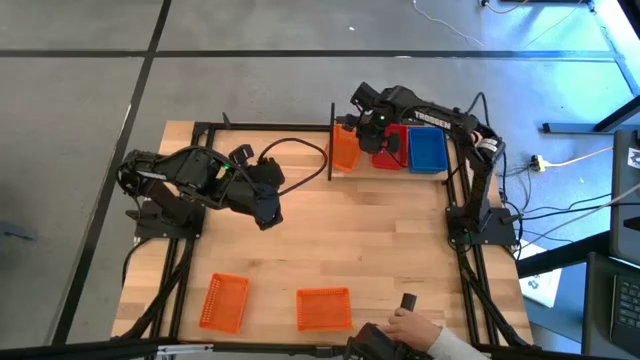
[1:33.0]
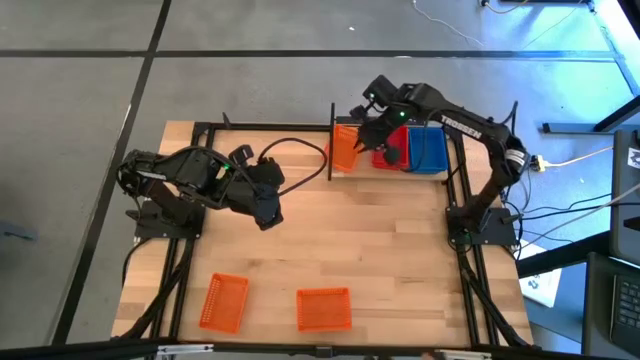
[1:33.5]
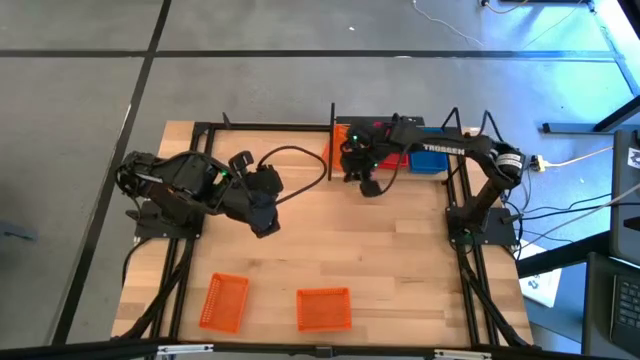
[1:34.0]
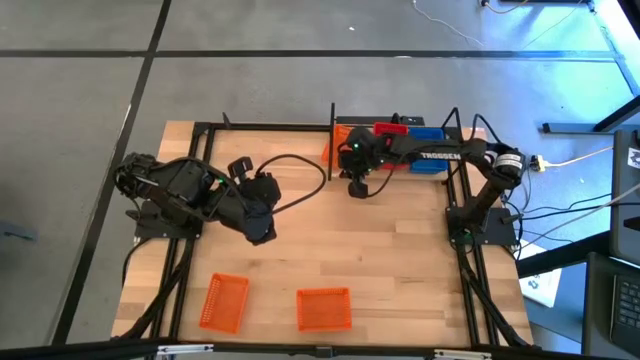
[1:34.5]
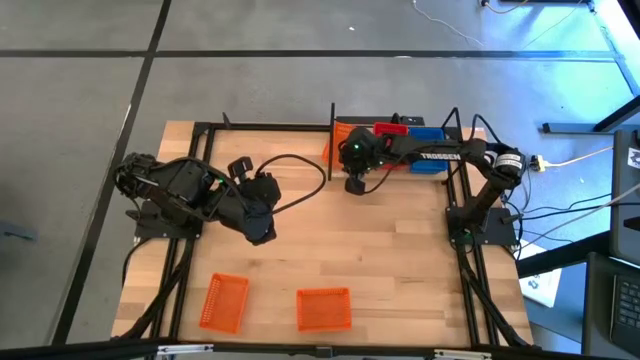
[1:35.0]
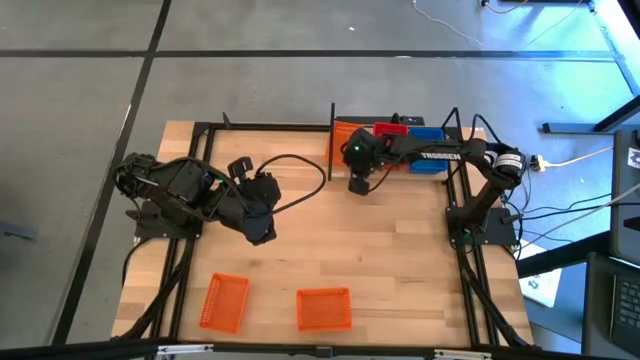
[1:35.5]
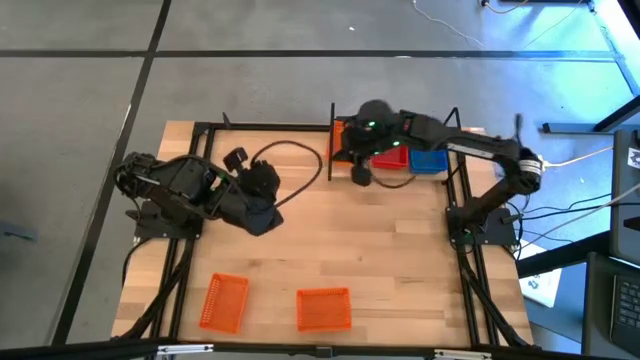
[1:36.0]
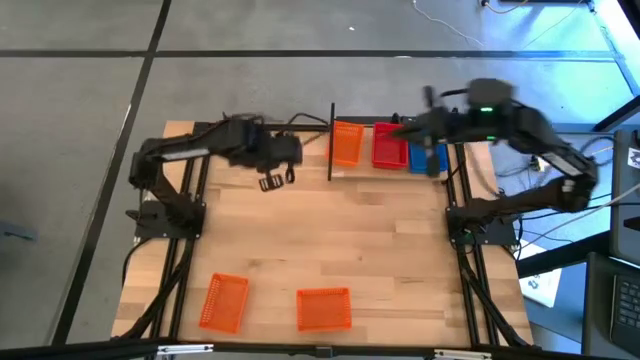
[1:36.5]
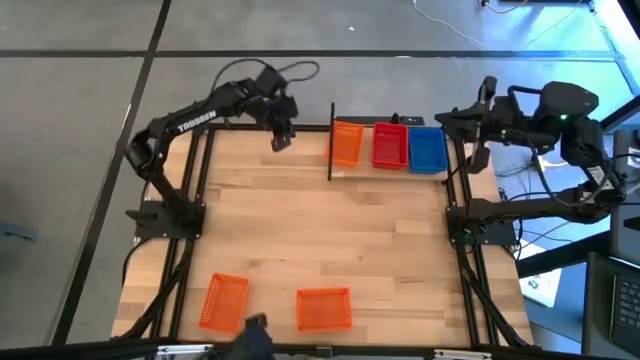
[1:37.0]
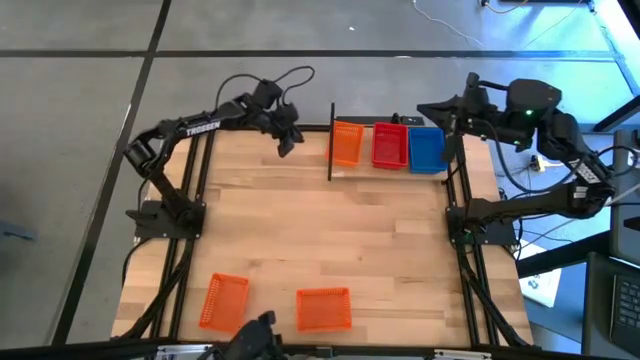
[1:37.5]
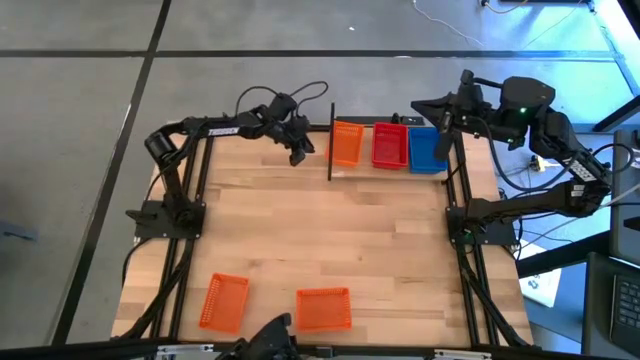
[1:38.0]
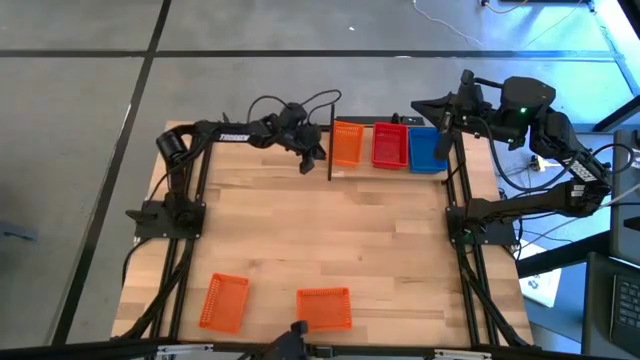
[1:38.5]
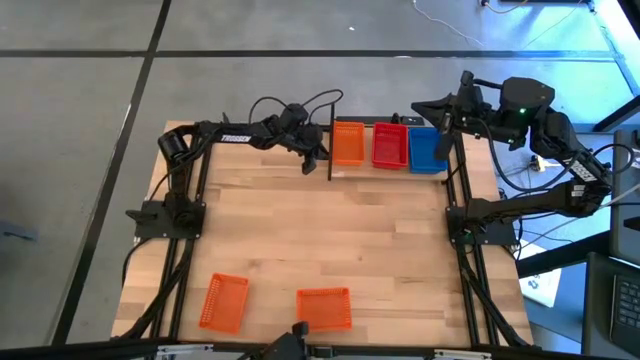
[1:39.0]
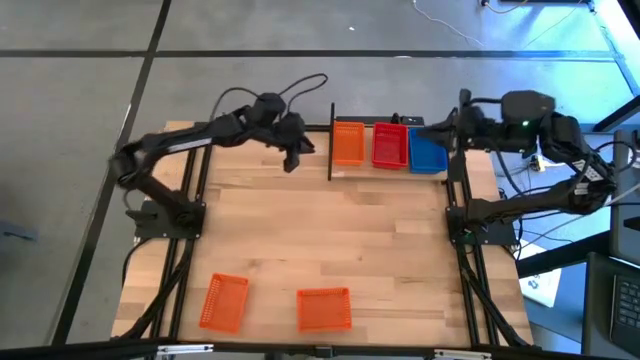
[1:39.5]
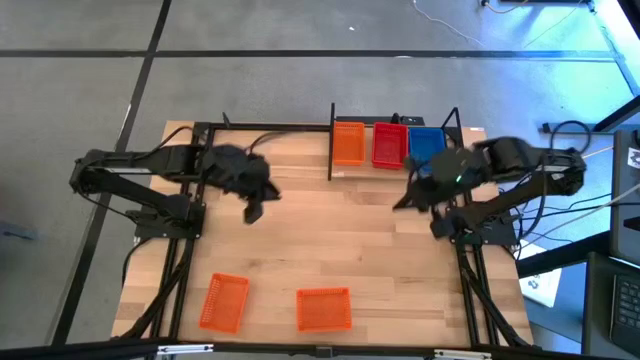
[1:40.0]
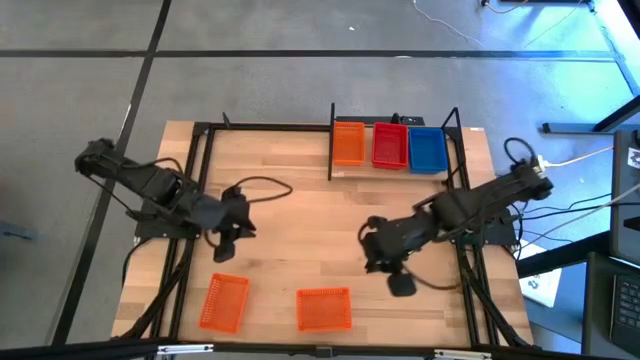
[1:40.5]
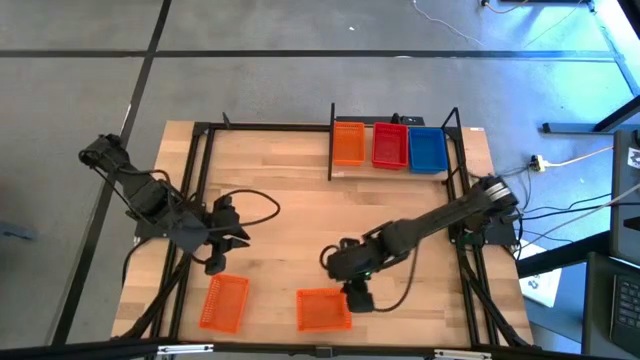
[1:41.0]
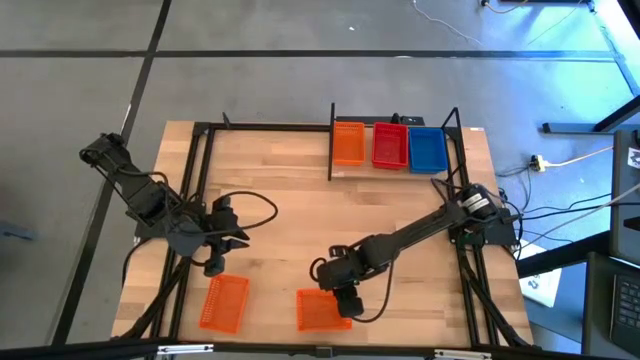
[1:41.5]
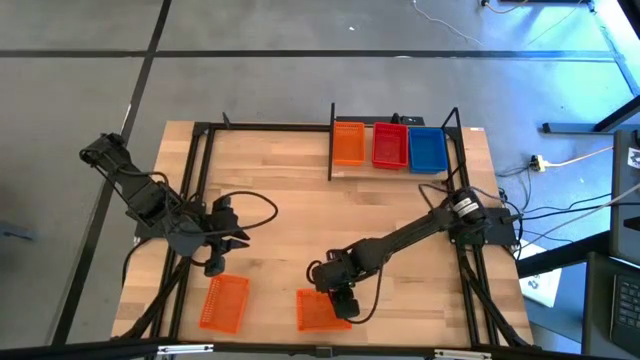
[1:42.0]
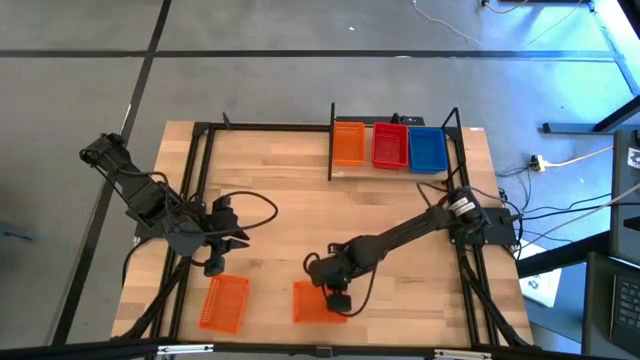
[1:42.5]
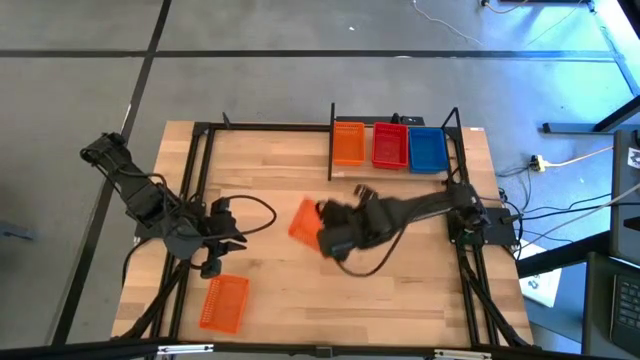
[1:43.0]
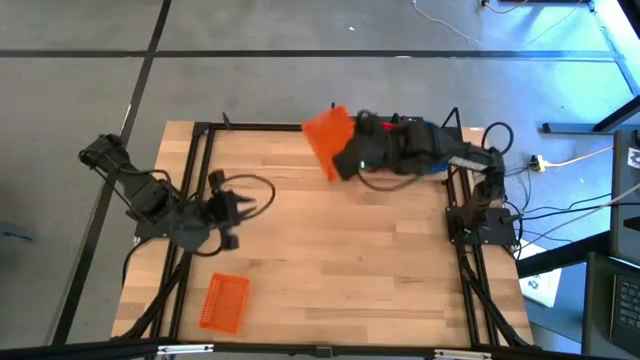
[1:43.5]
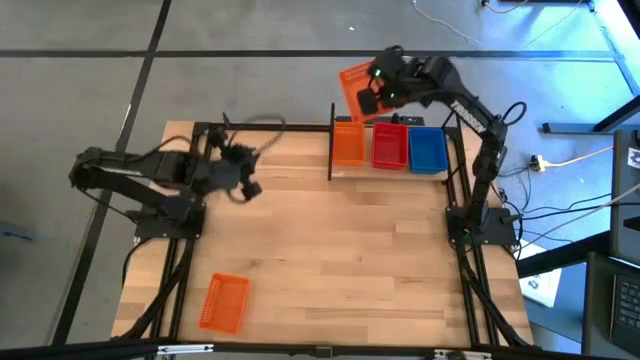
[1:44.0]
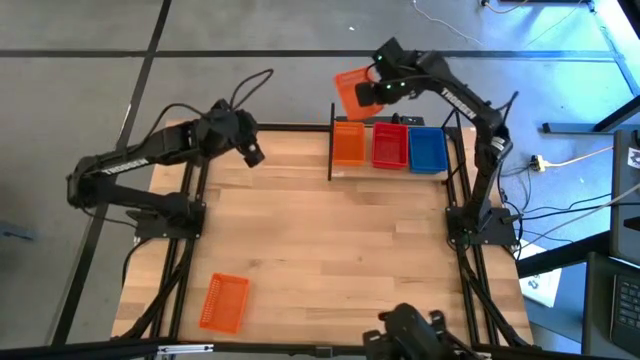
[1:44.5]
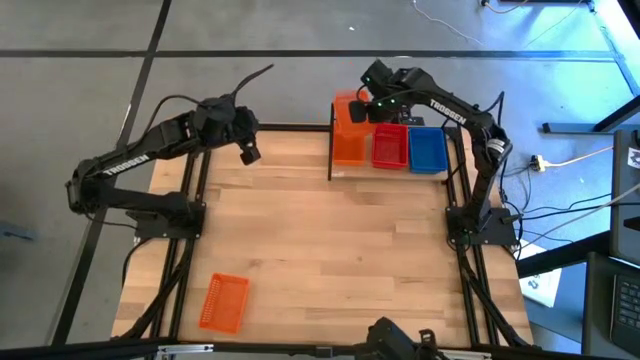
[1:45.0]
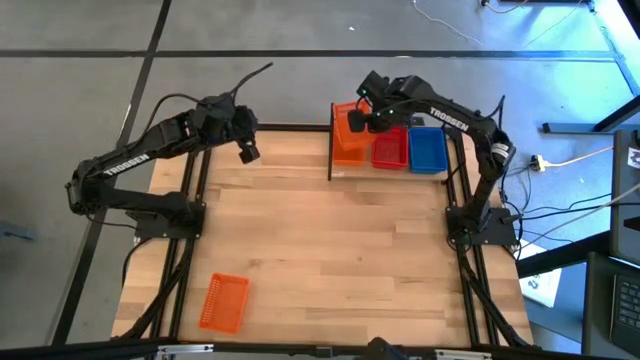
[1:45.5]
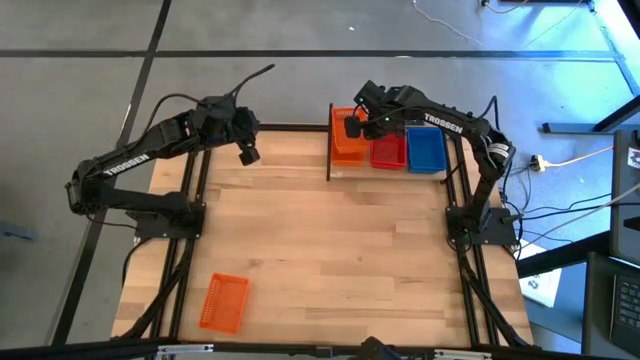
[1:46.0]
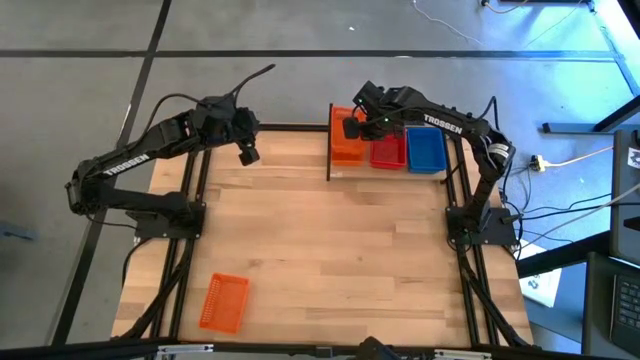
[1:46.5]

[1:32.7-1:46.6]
Task: Stack baskets on shelf by color
Stack the right orange basket on top of the orange basket on the shelf

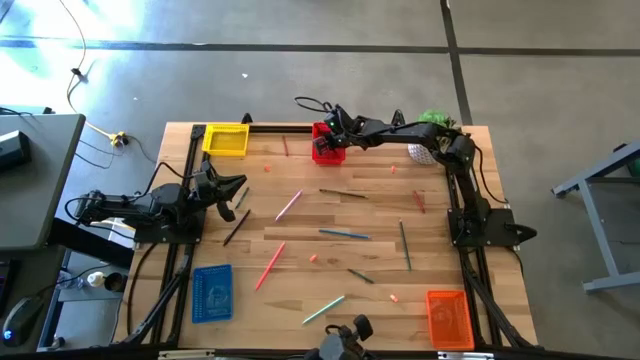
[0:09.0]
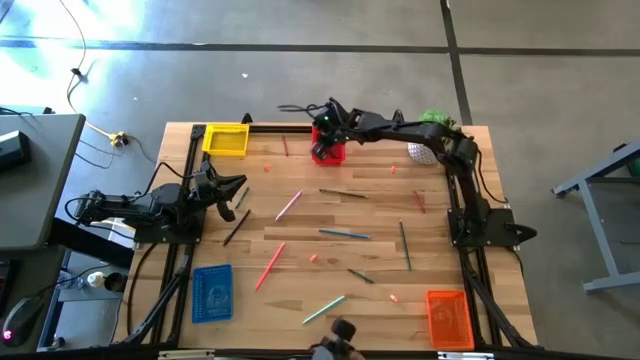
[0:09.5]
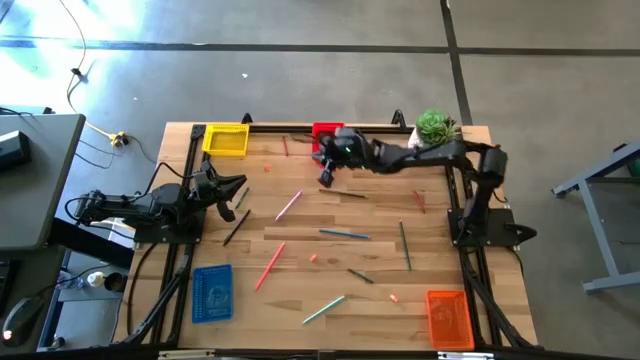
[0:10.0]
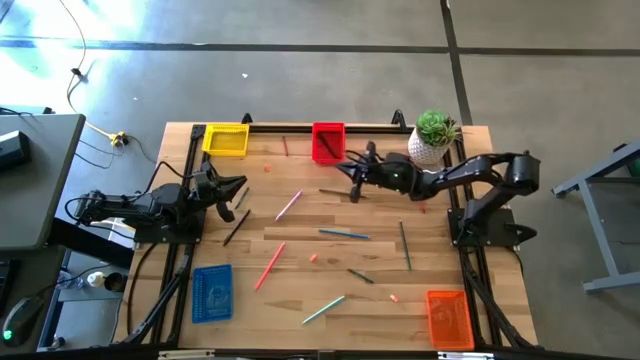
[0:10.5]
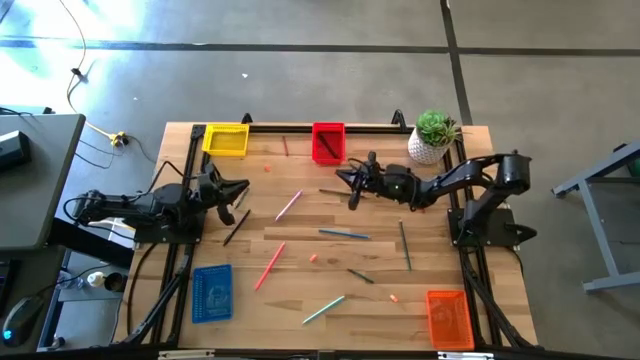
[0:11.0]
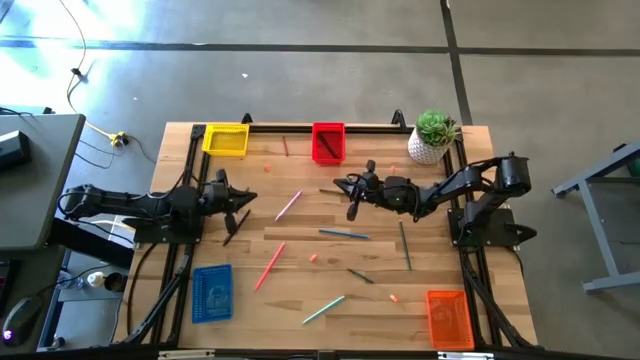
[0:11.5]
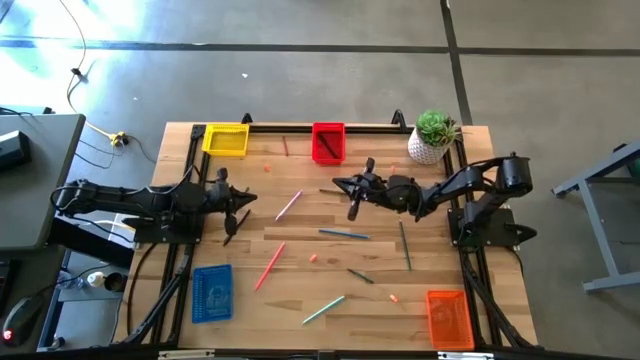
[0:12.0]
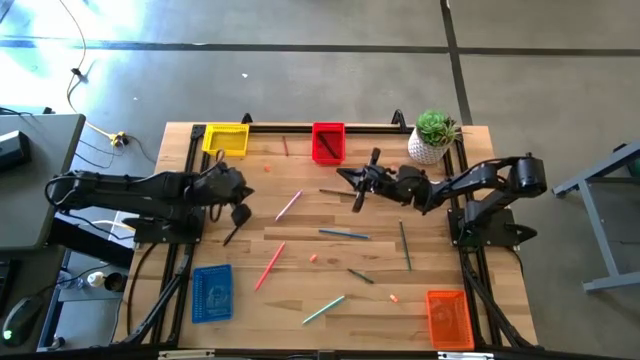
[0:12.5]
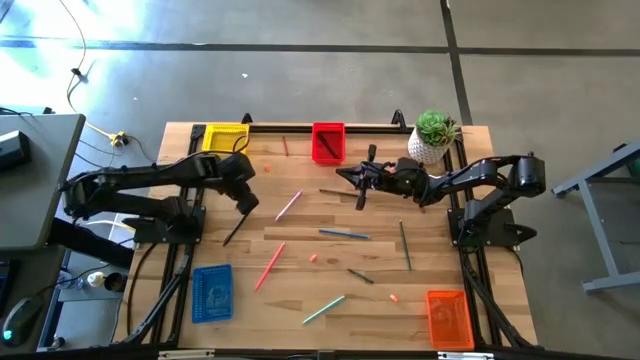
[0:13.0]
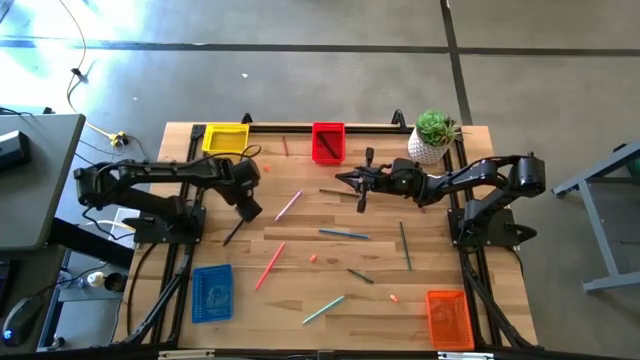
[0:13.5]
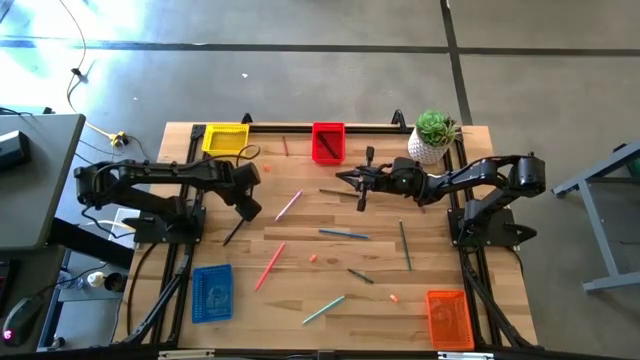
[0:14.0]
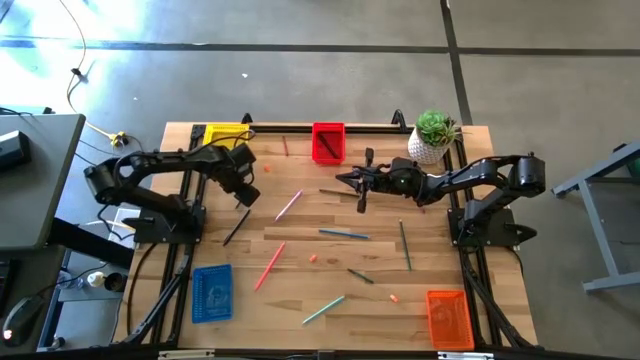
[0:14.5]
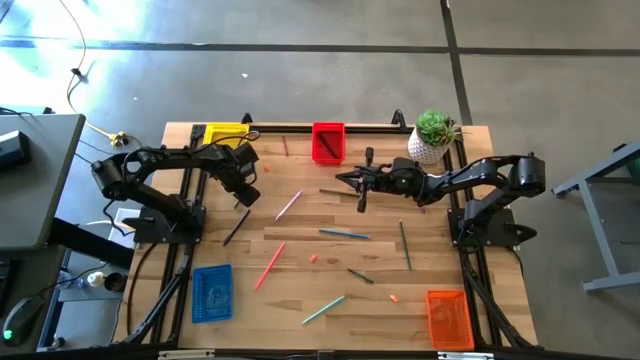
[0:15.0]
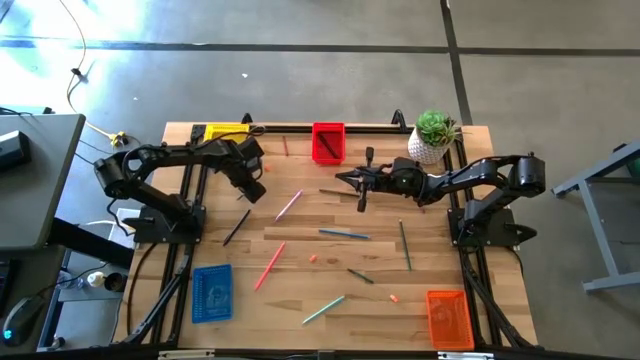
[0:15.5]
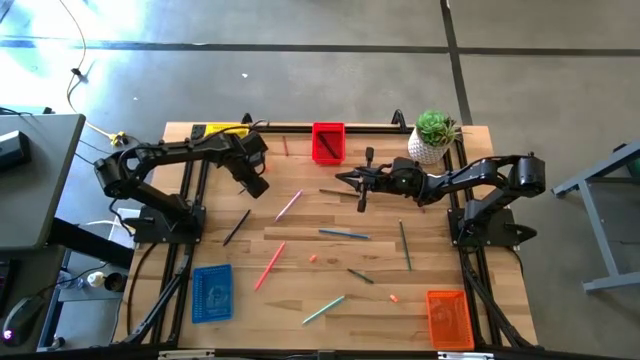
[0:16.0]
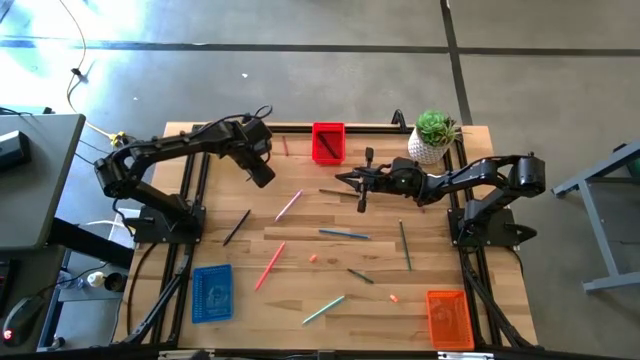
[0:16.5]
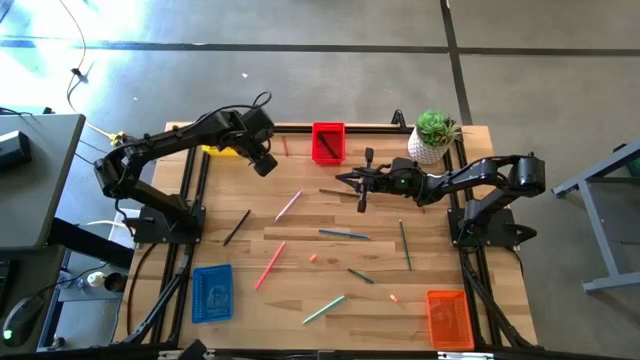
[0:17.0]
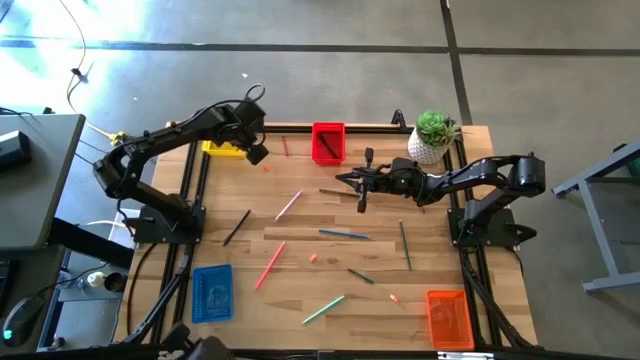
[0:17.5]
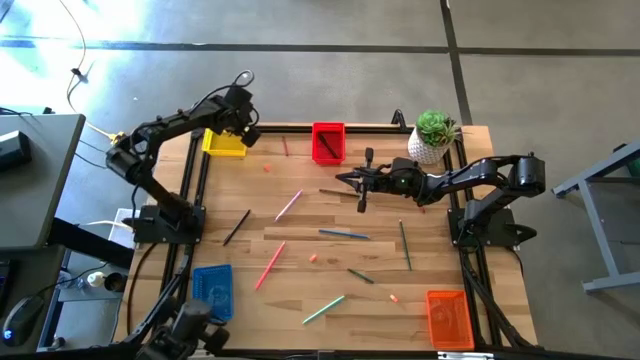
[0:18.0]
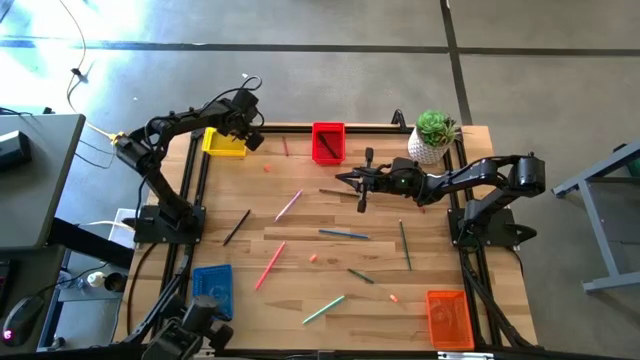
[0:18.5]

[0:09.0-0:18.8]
Task: Sort crayons/erasers/pens/pencils in bins
Put the top green crayon into the yellow bin
